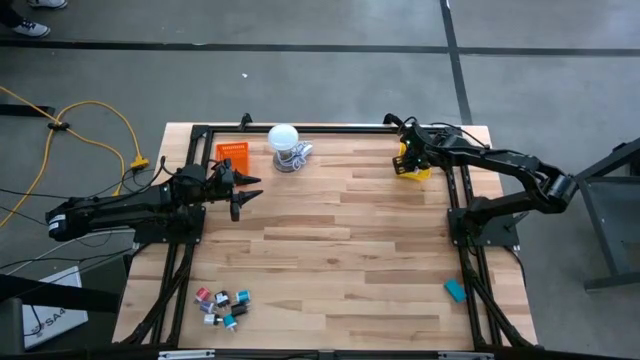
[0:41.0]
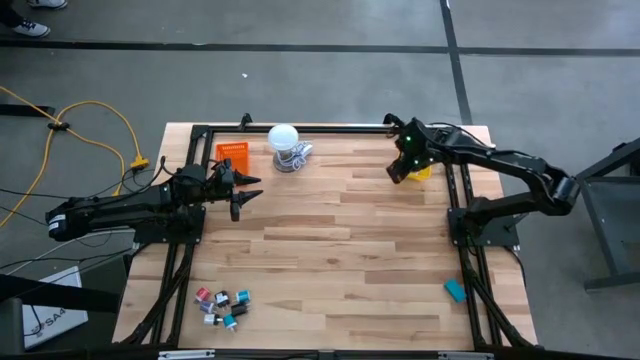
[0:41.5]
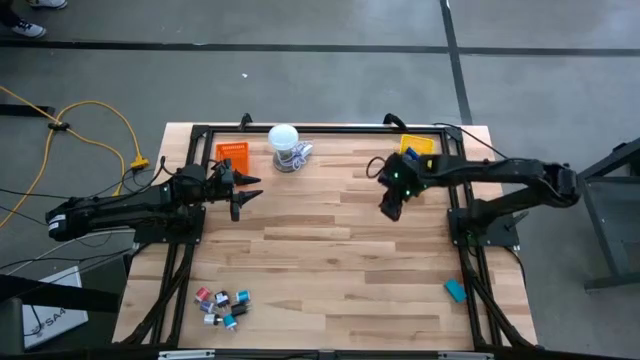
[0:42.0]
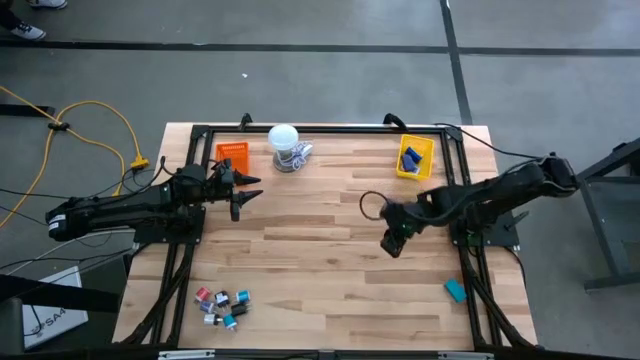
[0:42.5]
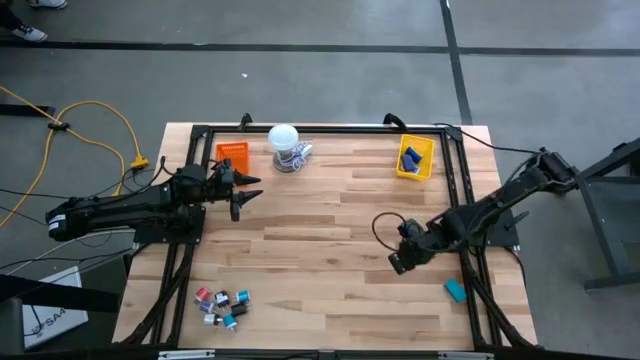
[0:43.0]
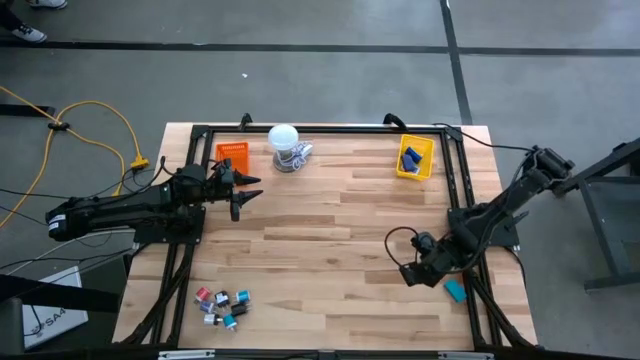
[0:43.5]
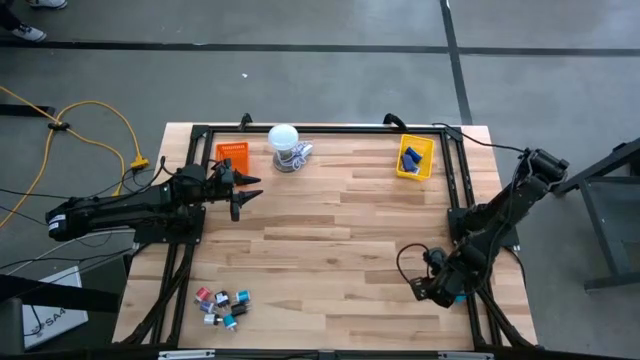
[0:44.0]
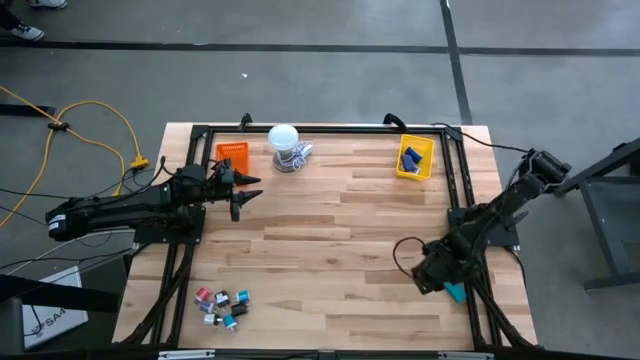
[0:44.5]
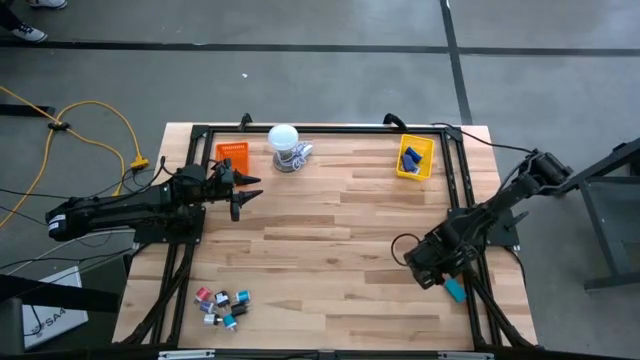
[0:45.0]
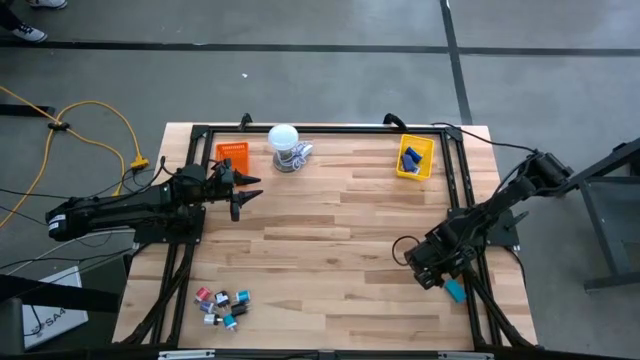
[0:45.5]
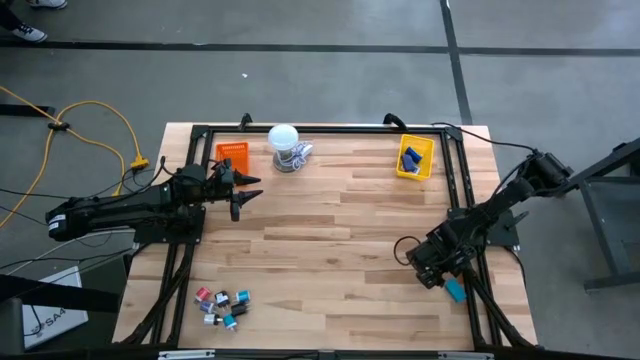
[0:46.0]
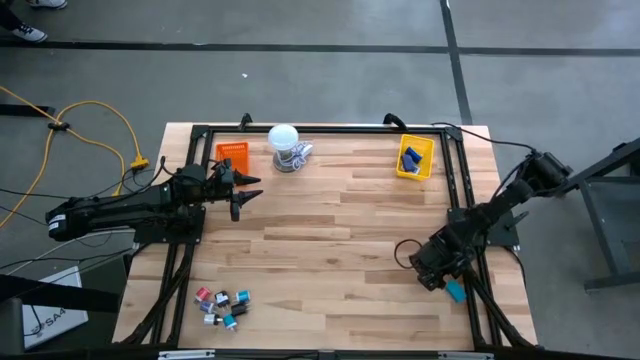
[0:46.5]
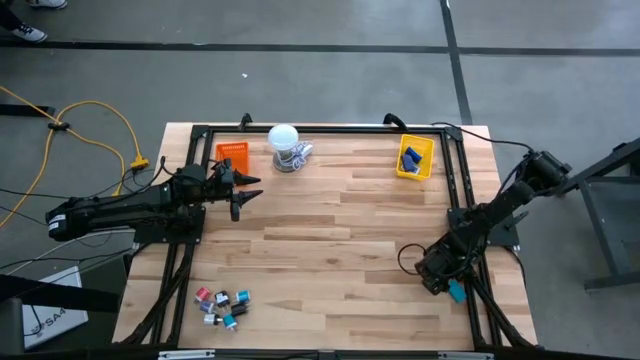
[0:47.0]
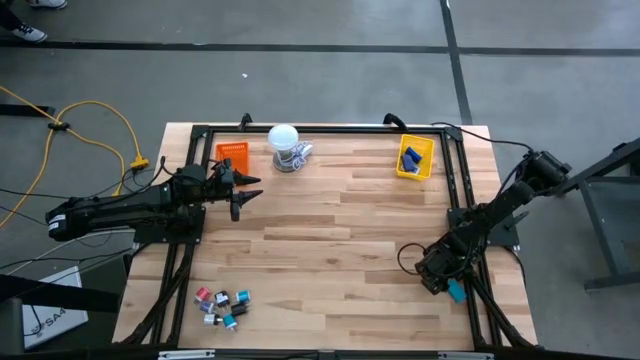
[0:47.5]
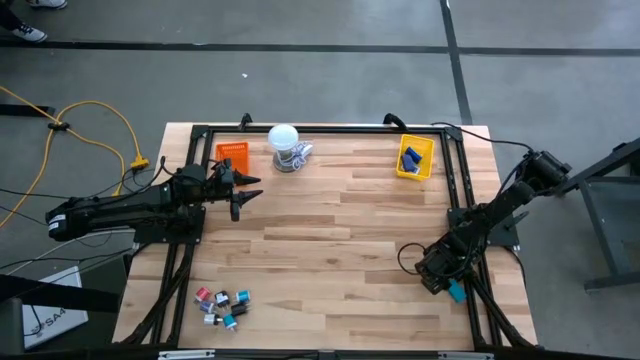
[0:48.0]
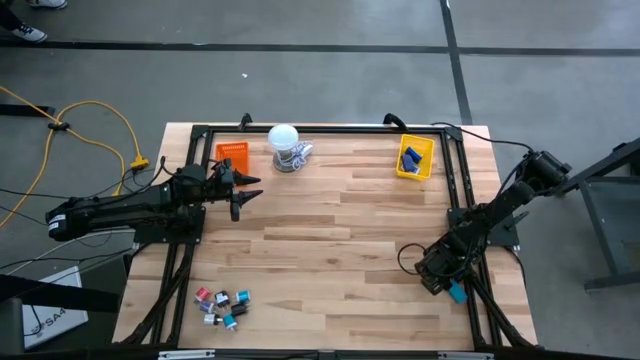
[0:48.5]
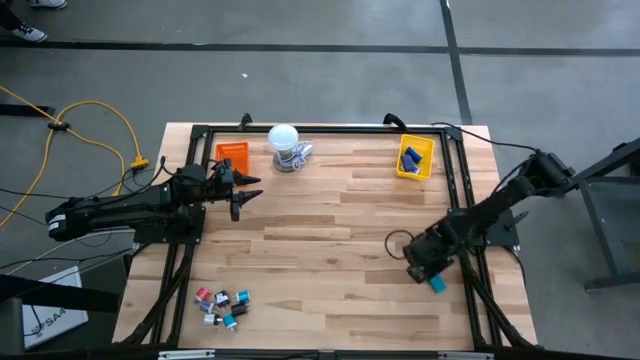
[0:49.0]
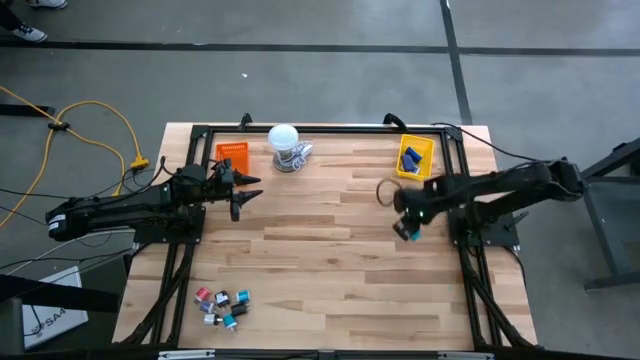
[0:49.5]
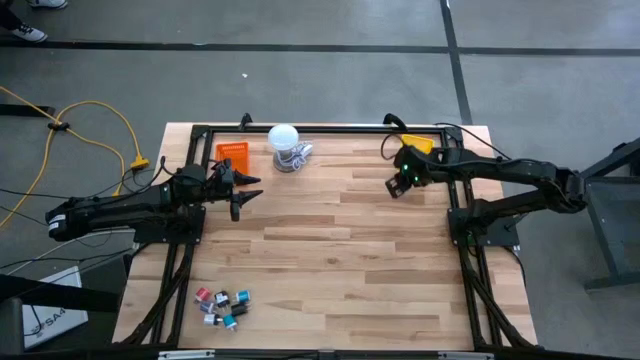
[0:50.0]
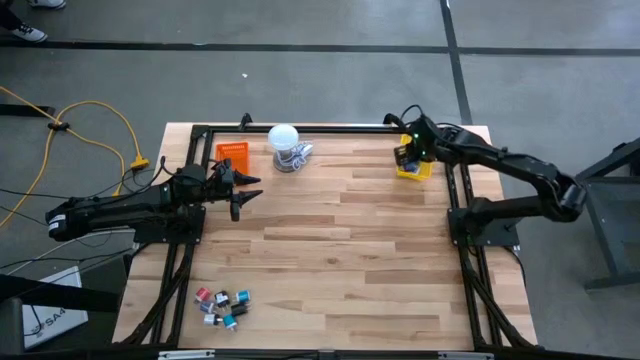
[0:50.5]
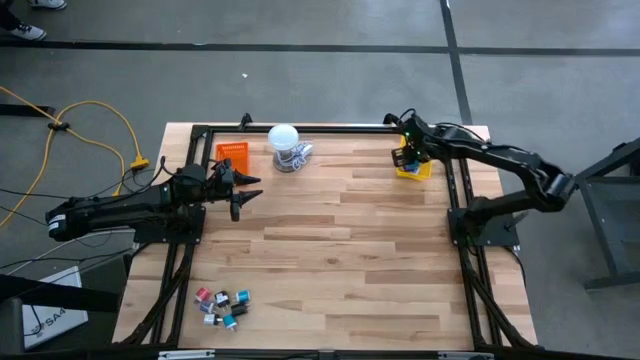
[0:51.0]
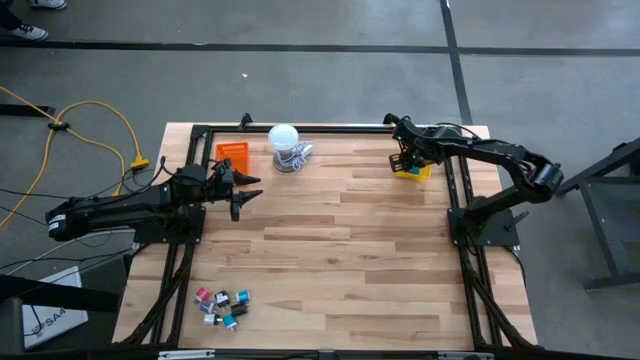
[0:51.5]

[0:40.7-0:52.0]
Task: Pick & Place Office items
Put the light blue digital timer into the yellow basket
